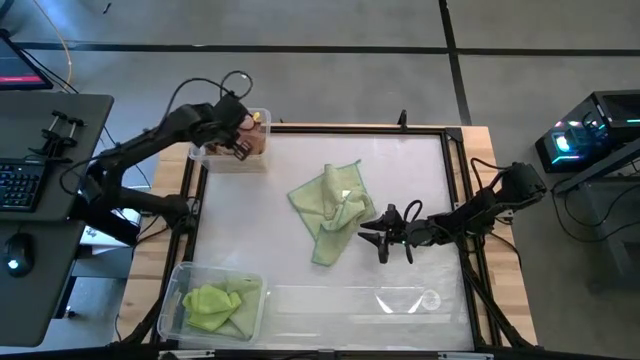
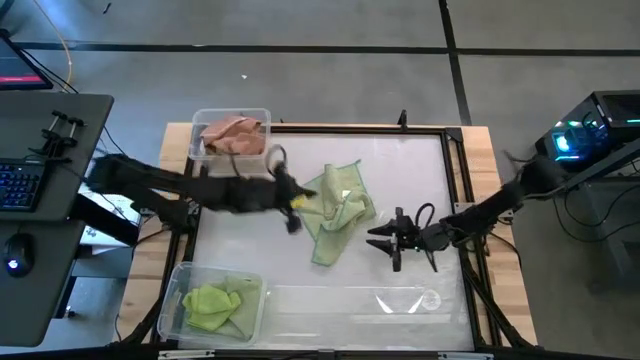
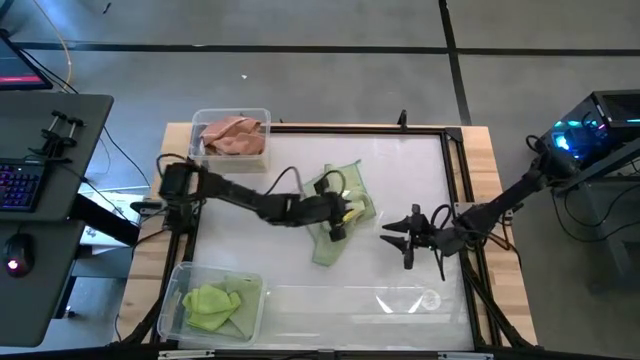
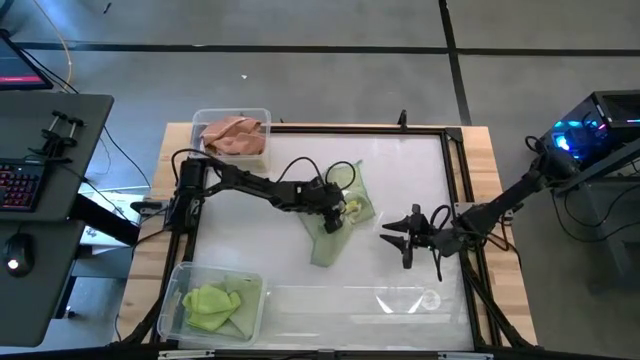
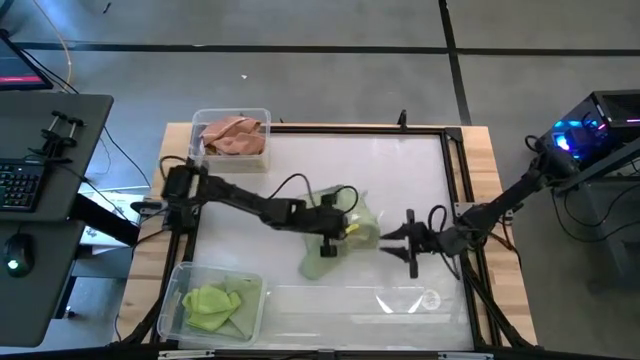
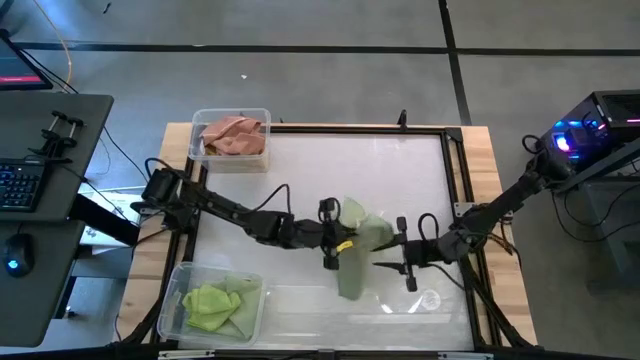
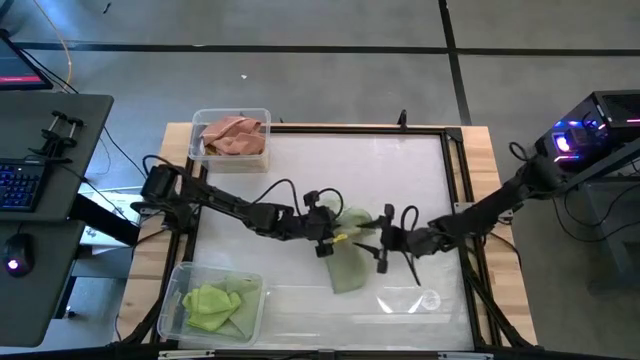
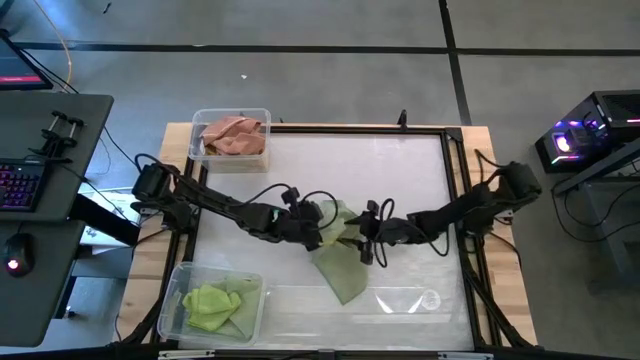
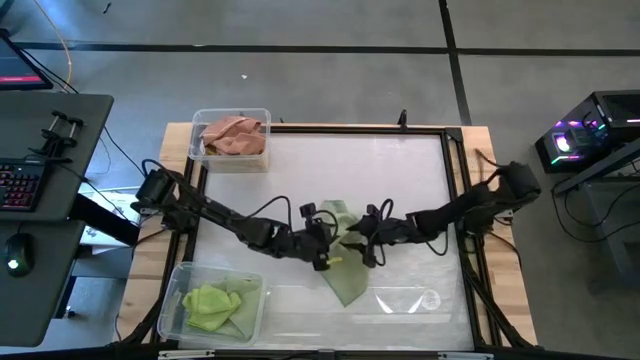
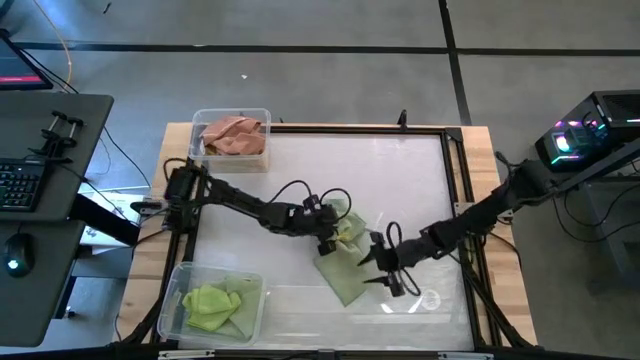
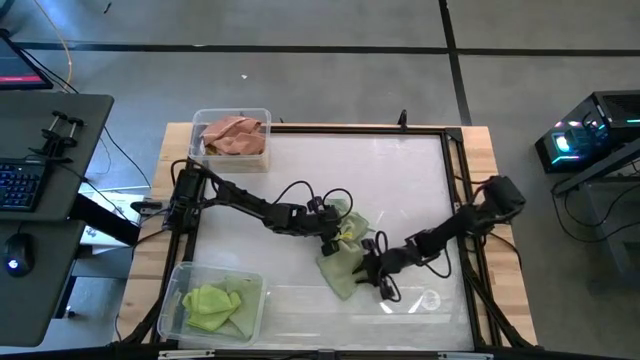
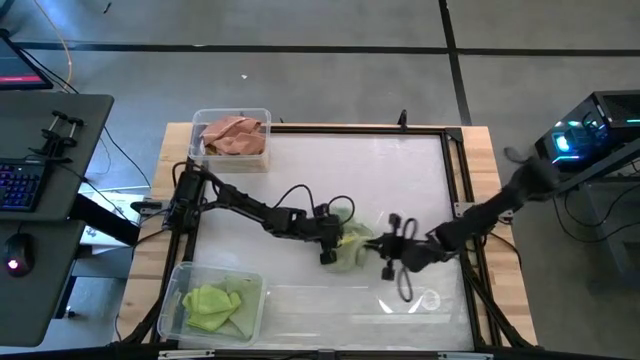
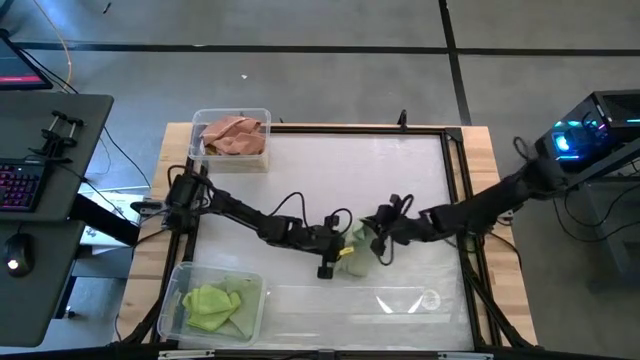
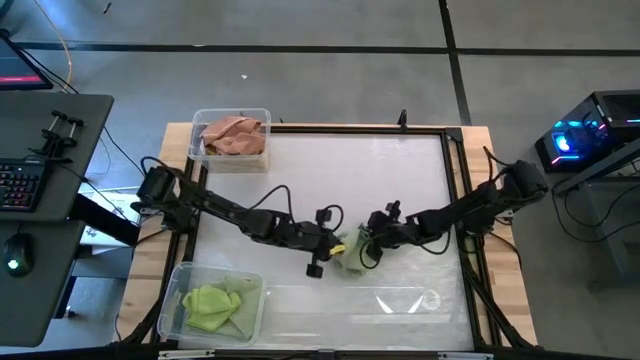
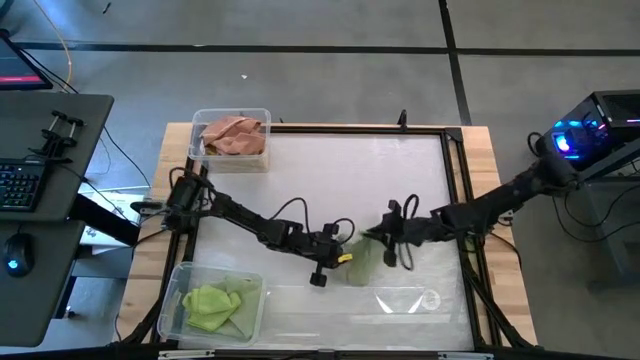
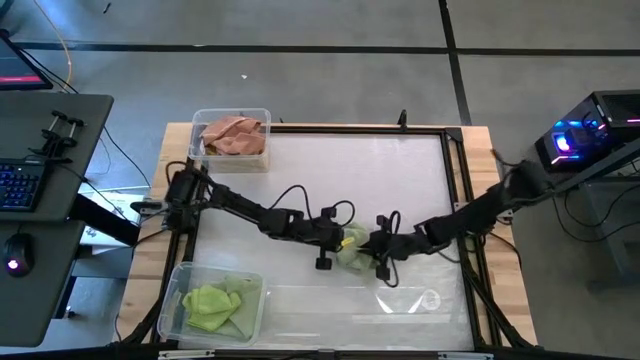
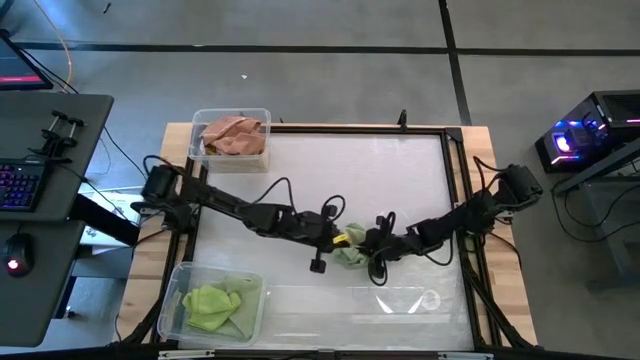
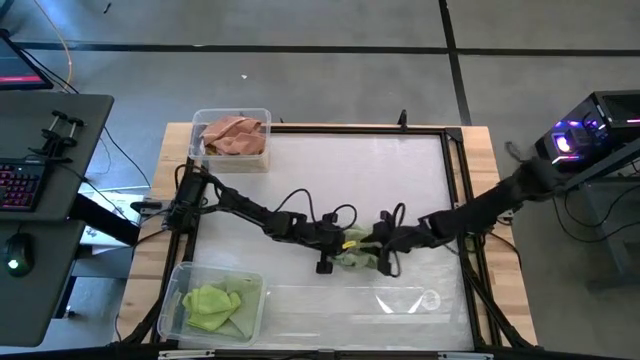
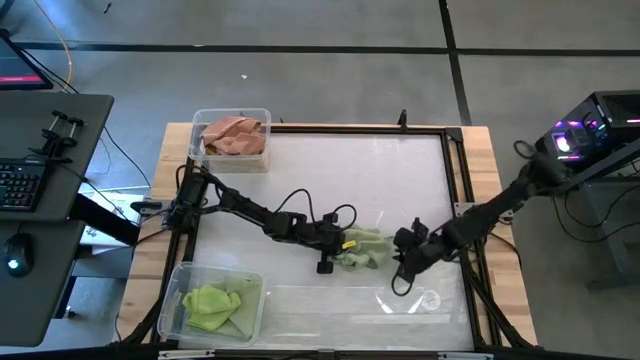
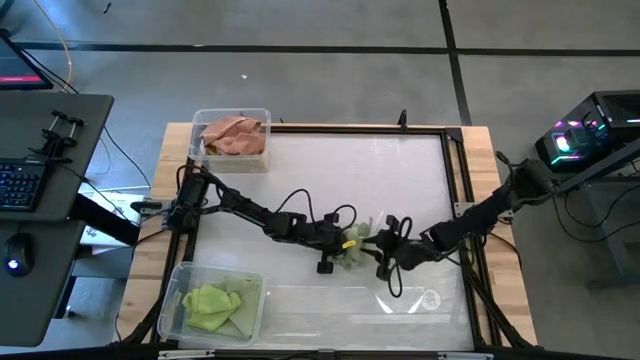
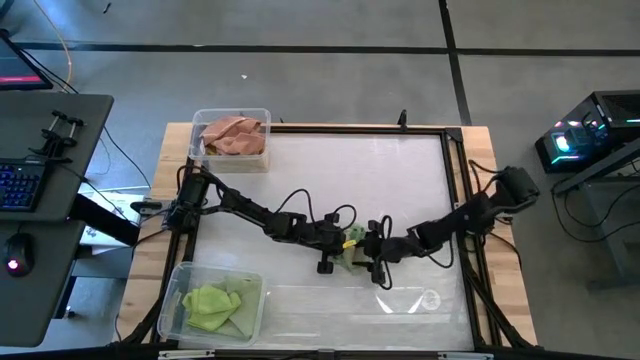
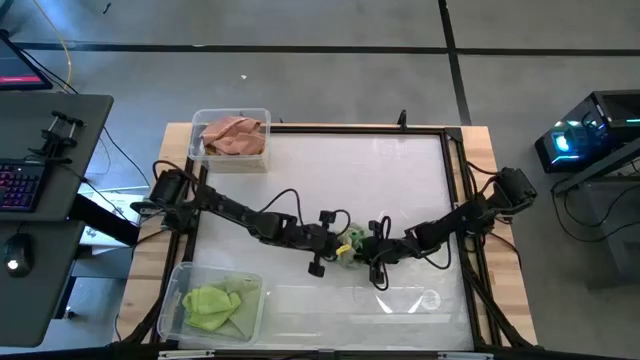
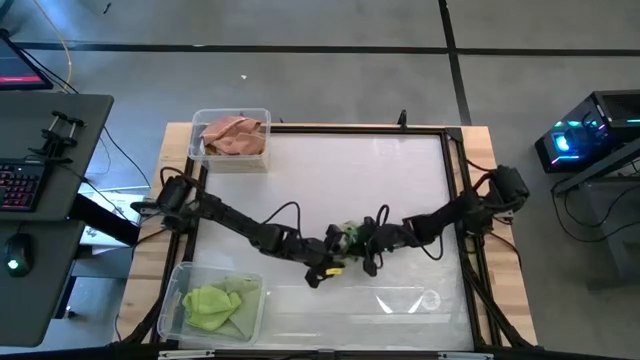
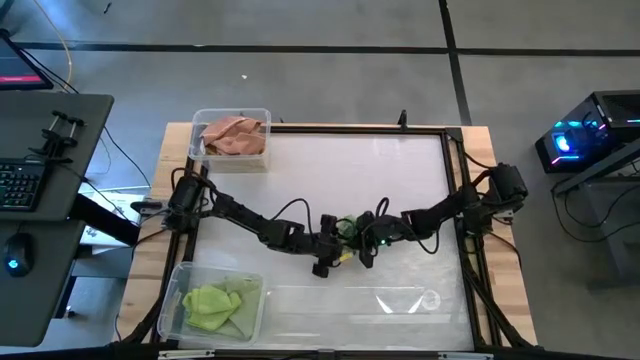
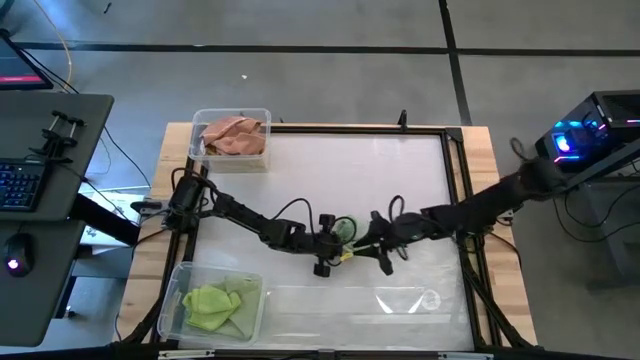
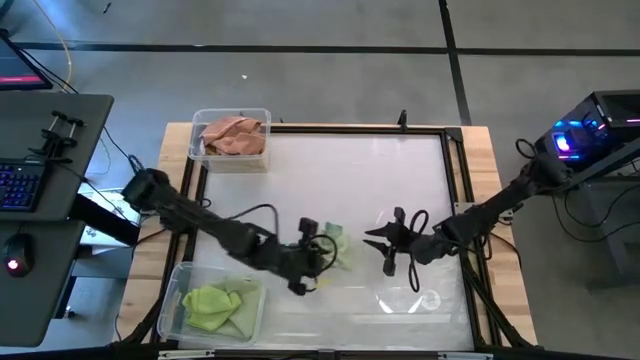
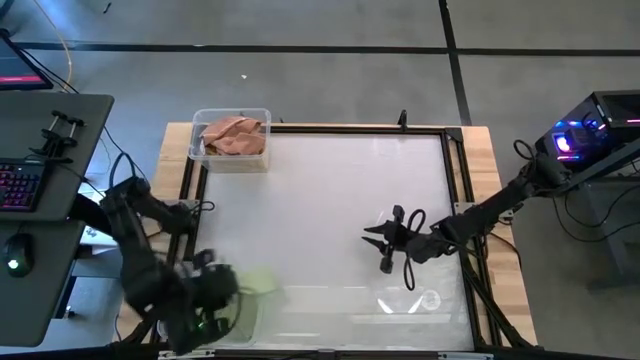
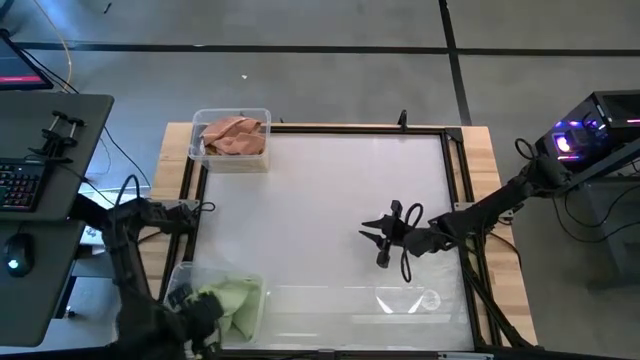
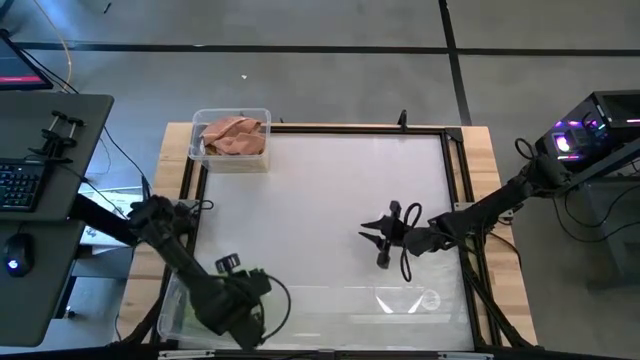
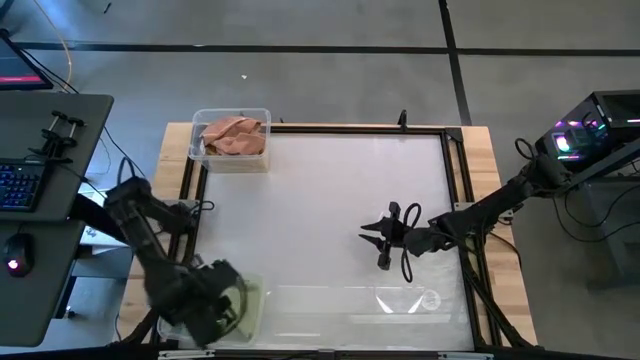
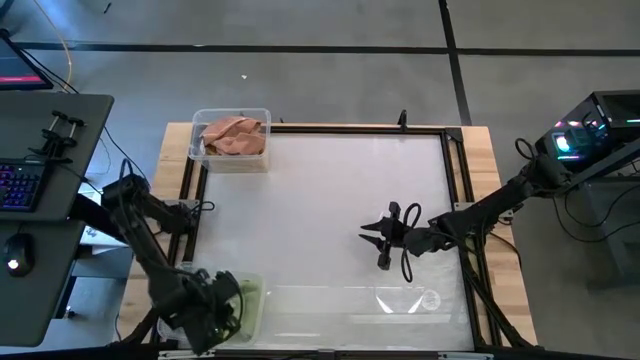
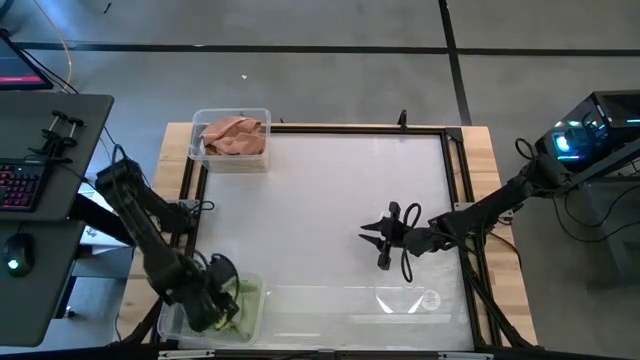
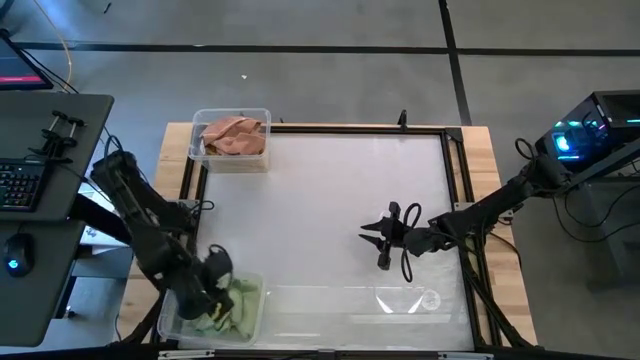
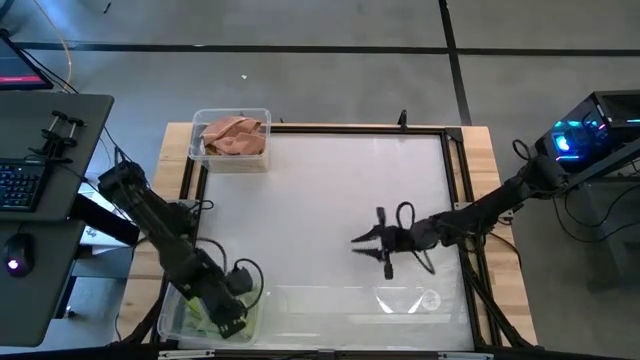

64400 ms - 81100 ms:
Task: Sort towels by color in basket
Put the green towel into the bottom transparent bin

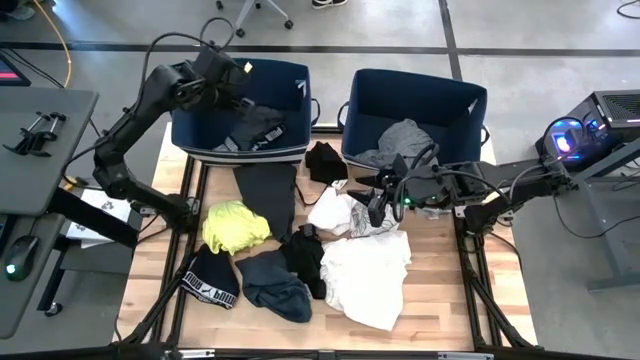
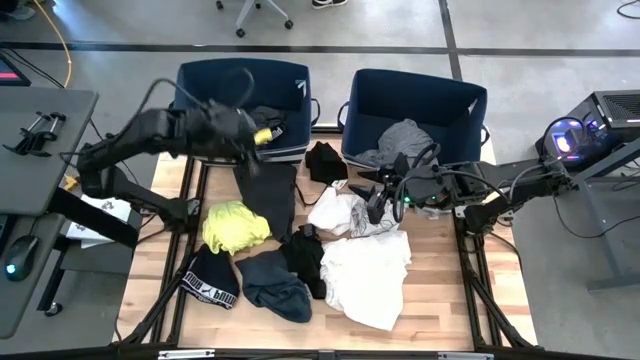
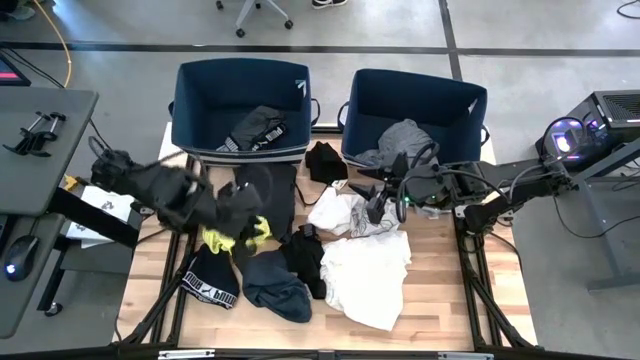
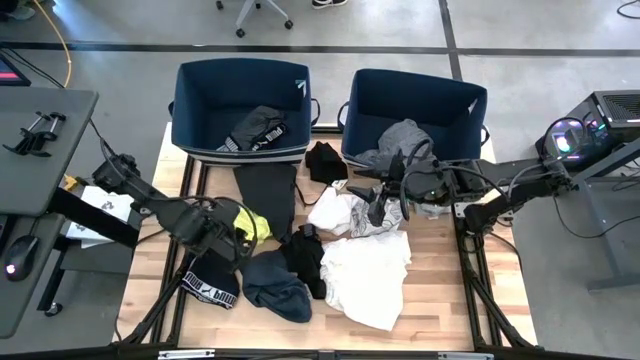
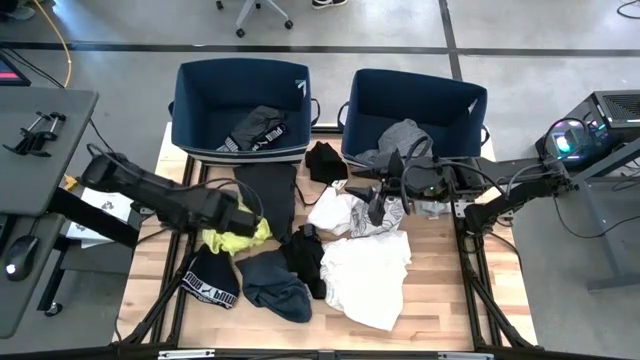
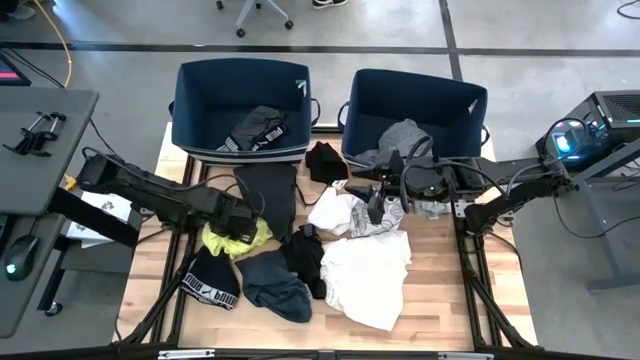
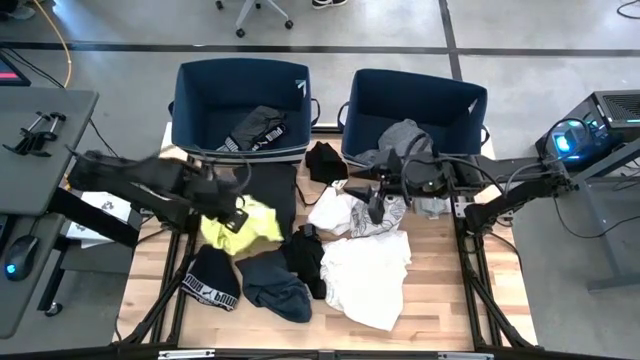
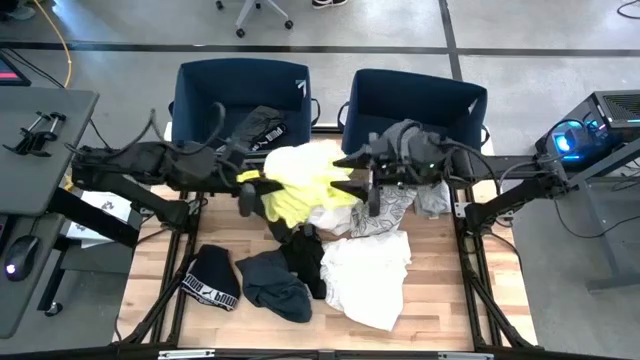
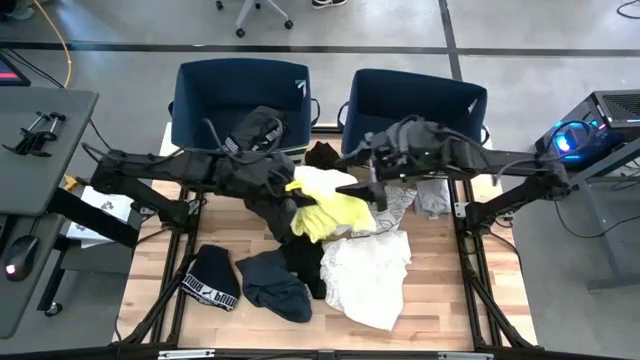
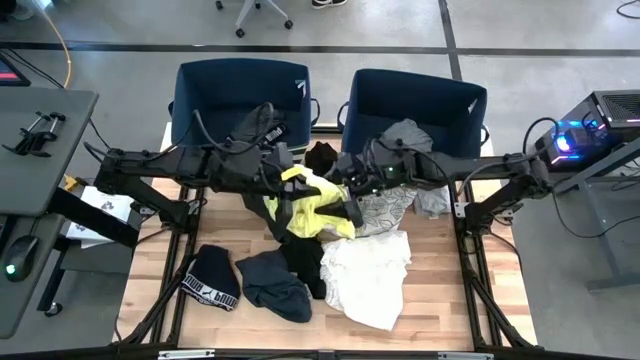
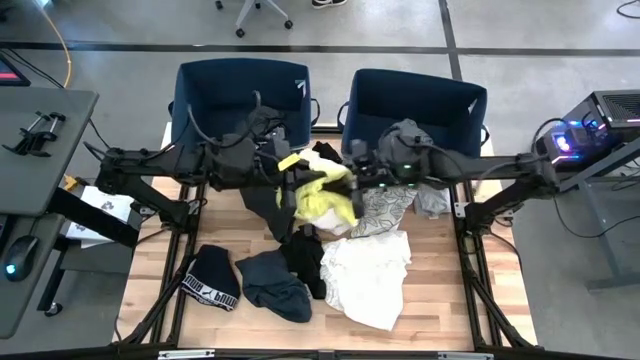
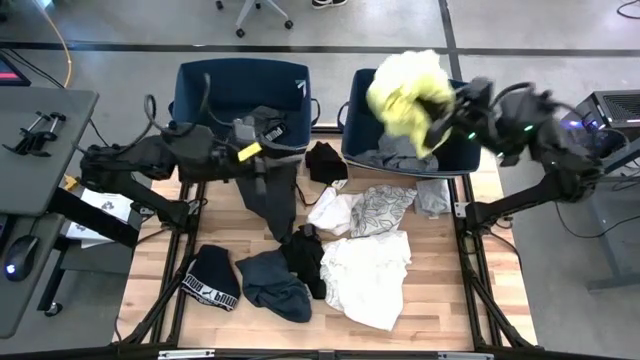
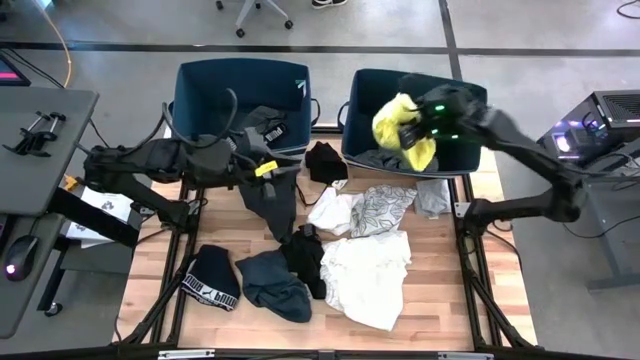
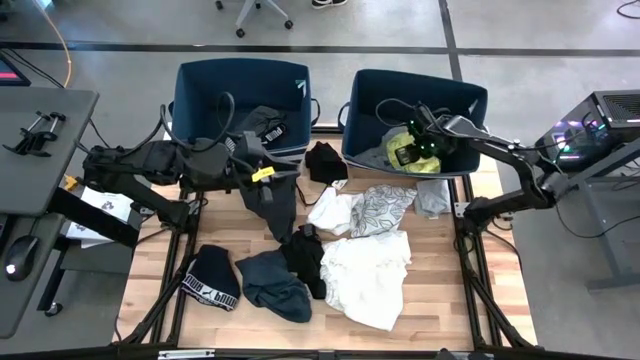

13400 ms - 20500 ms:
Task: Sort clothes
Put the yellow shirt into the right laundry bin
